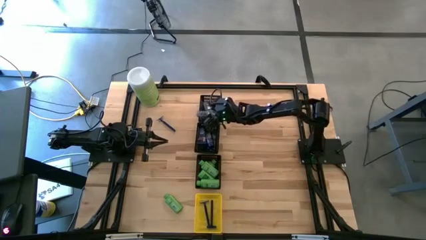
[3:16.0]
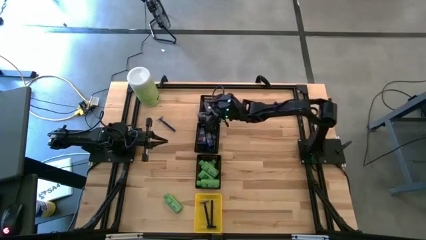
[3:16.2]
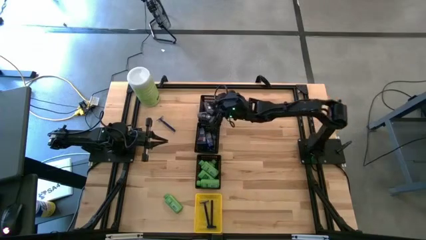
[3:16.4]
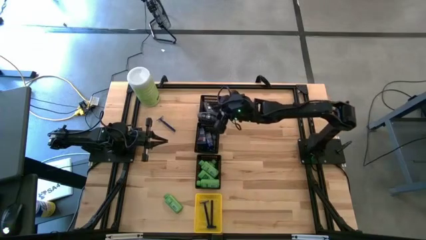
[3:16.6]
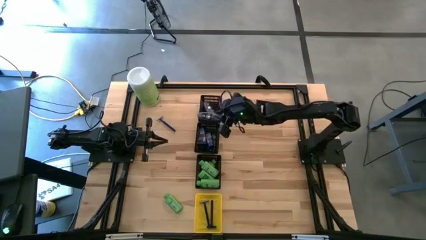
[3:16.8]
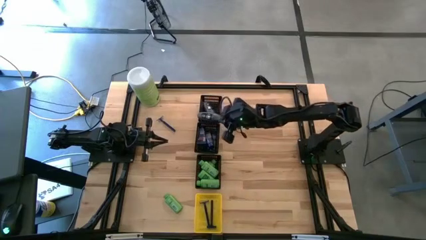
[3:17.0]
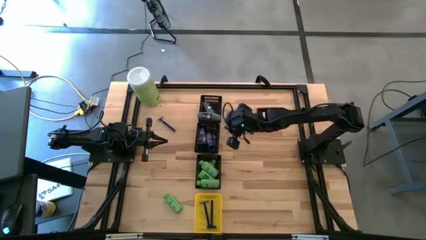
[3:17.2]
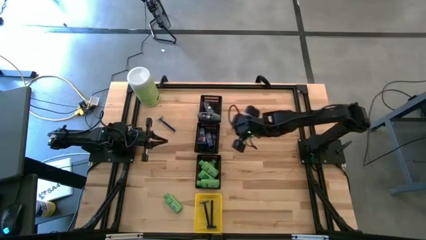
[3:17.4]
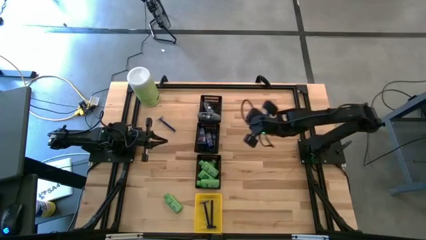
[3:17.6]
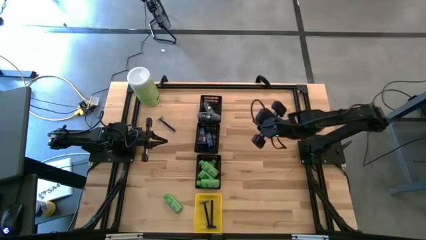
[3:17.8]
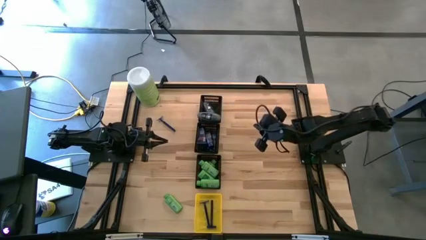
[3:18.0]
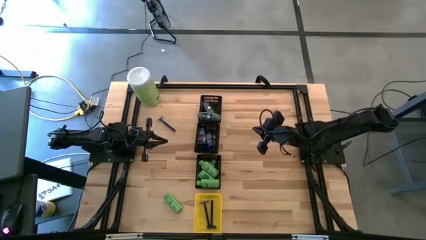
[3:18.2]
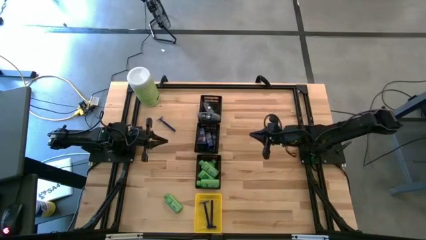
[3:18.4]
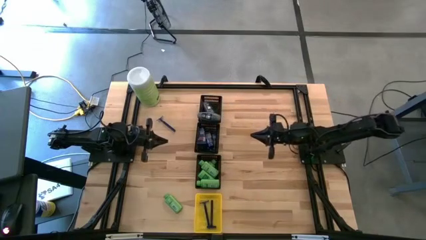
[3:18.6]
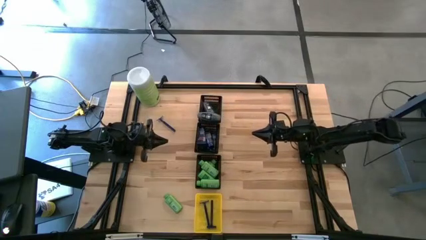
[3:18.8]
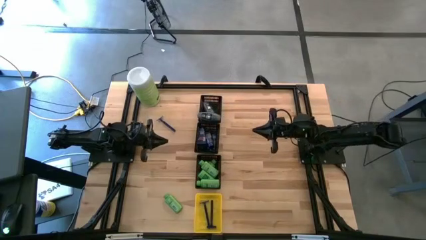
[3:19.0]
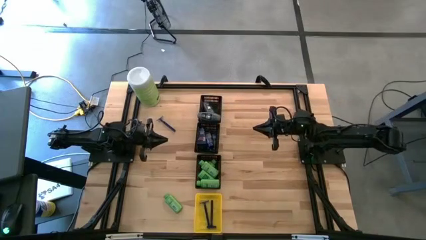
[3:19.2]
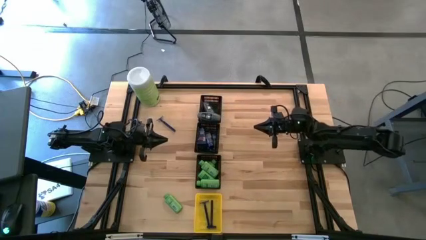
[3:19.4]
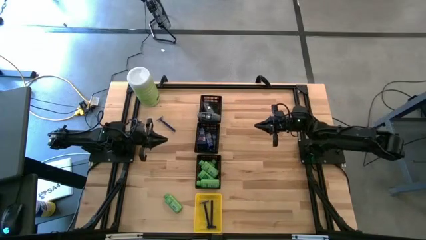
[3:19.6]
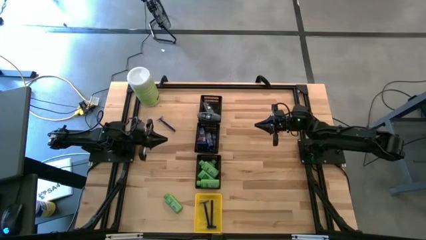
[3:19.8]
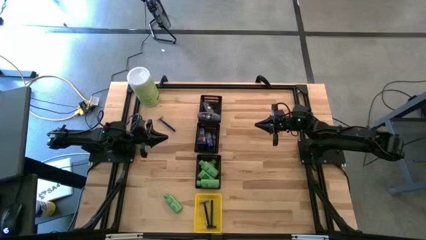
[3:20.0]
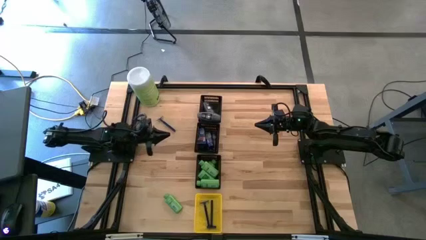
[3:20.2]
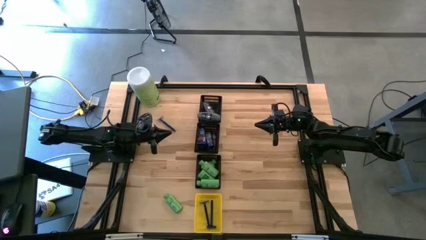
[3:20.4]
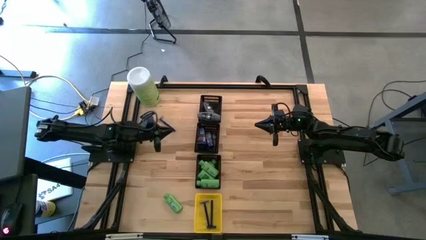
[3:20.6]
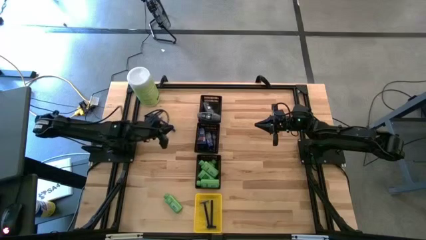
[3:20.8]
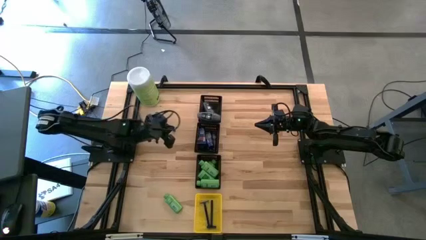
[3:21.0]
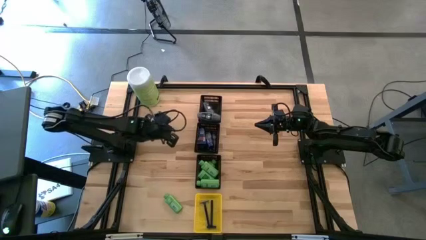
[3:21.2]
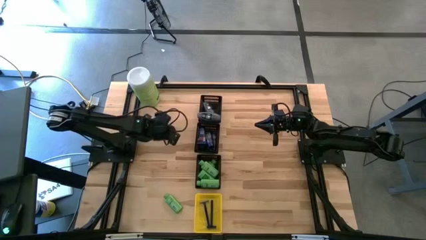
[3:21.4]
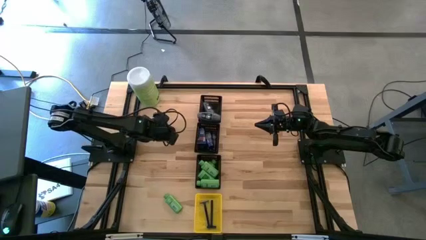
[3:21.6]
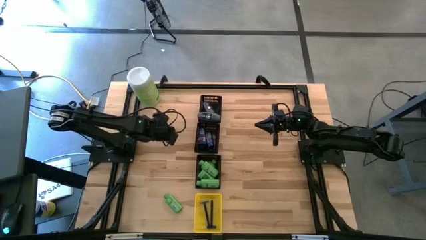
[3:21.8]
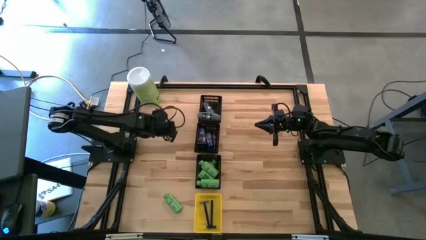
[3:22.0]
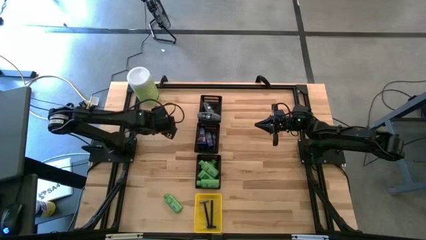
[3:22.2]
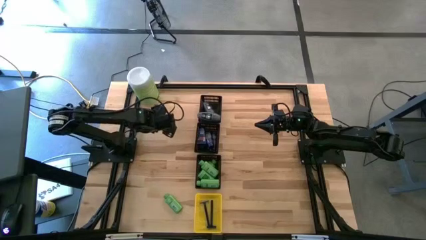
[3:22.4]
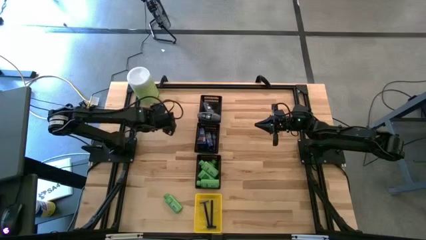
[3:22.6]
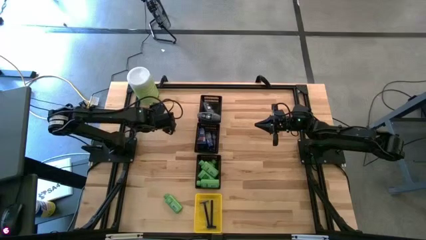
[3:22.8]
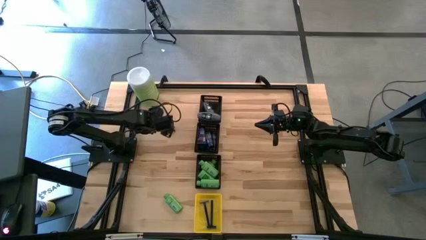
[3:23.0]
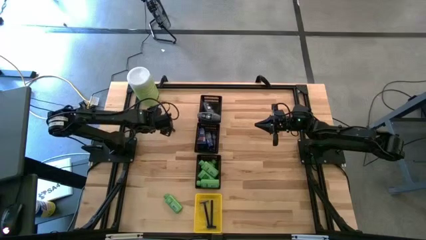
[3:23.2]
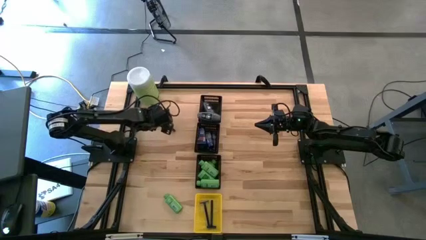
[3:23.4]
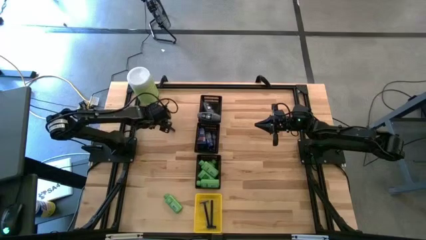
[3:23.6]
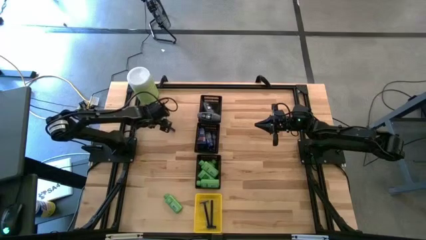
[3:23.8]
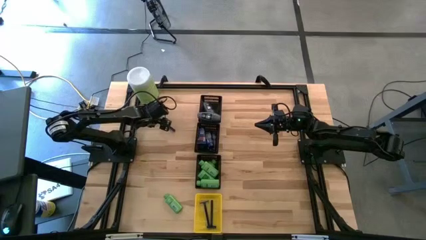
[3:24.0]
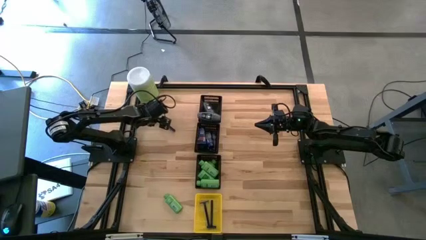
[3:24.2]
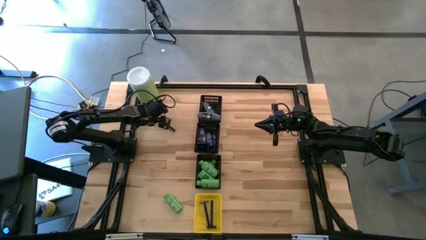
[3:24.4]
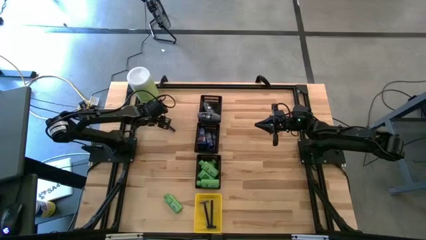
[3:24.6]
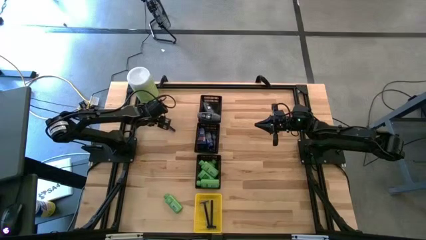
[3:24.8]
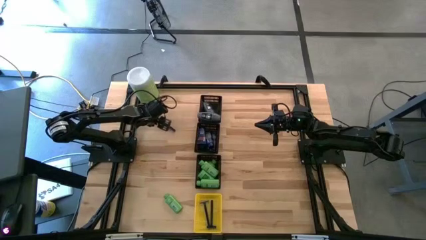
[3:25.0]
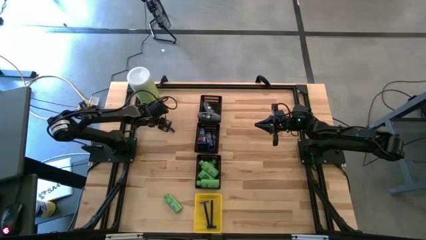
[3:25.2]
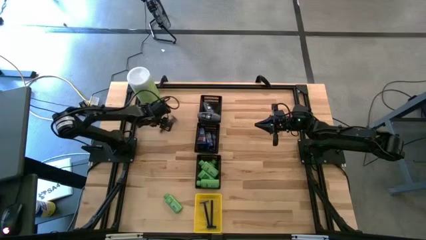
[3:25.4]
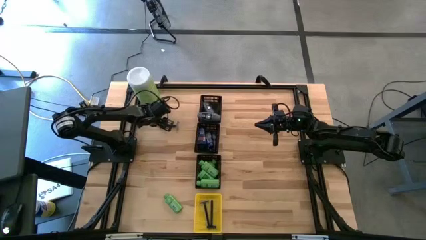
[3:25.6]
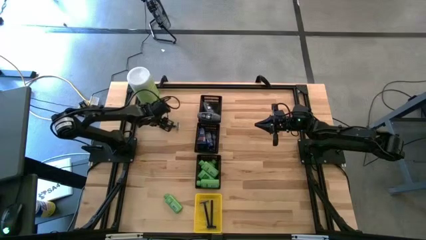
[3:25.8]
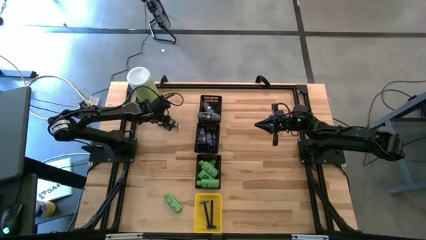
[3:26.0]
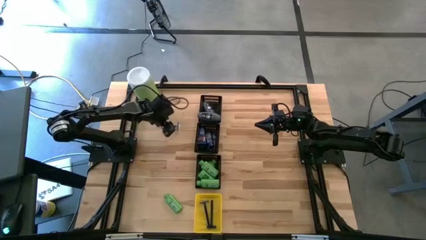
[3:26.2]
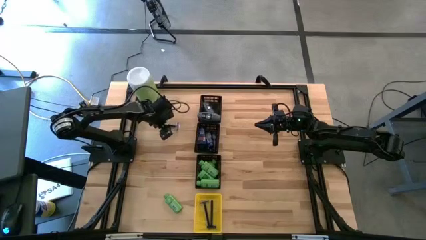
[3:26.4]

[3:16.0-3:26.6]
Task: Pick & Place Travel size toiletries
Put the blue razor into the yellow bin

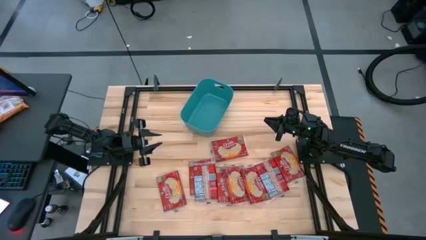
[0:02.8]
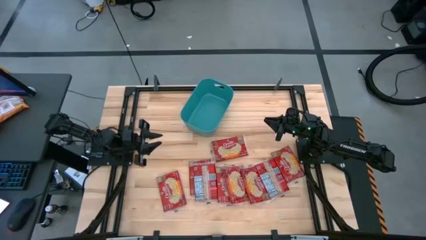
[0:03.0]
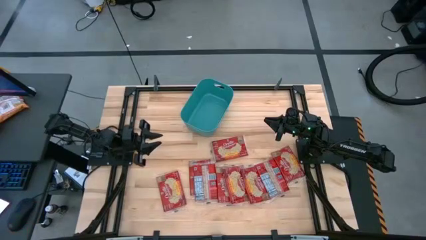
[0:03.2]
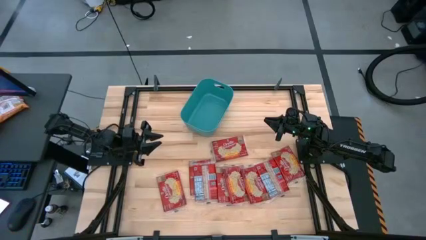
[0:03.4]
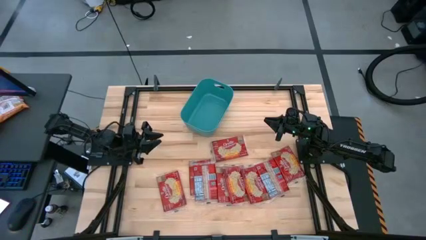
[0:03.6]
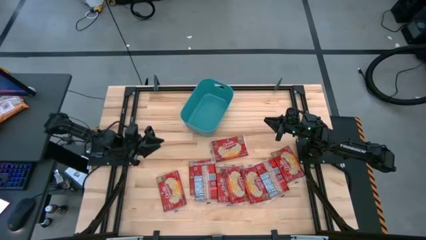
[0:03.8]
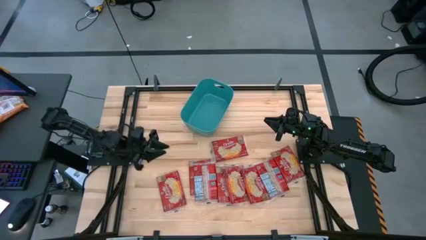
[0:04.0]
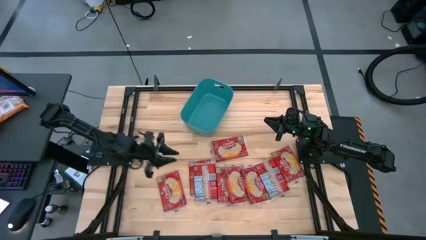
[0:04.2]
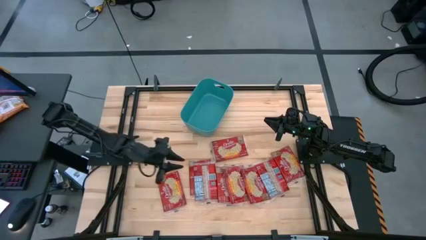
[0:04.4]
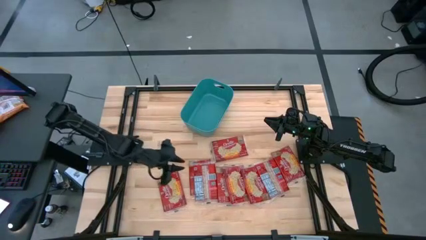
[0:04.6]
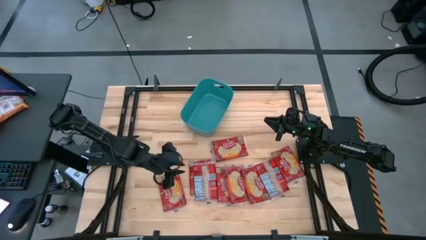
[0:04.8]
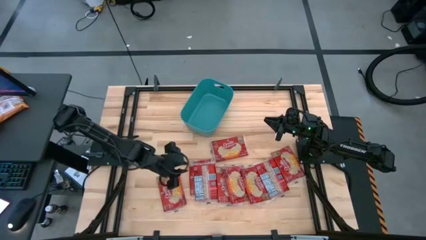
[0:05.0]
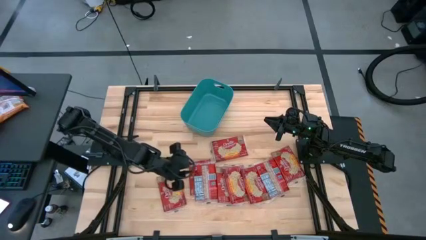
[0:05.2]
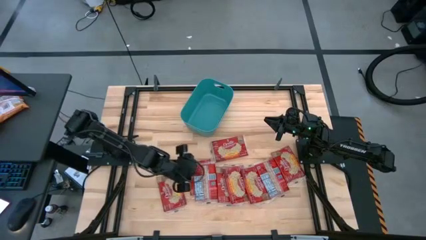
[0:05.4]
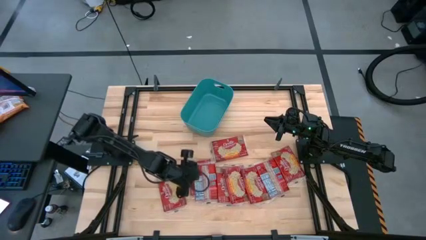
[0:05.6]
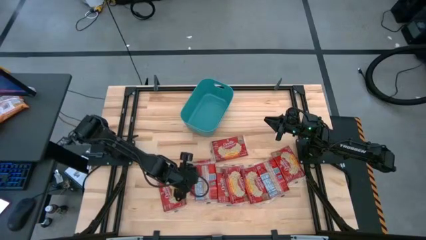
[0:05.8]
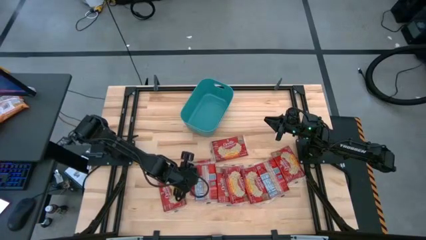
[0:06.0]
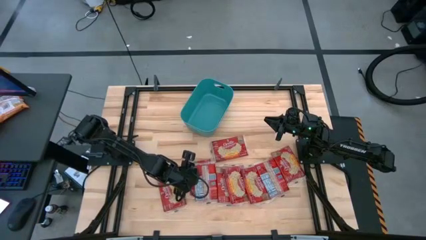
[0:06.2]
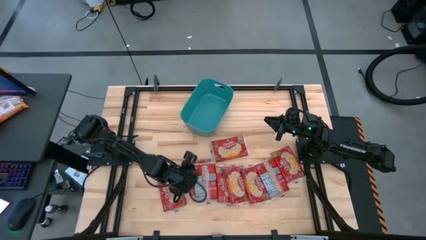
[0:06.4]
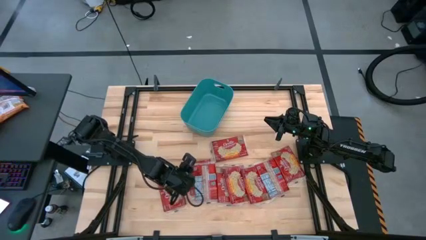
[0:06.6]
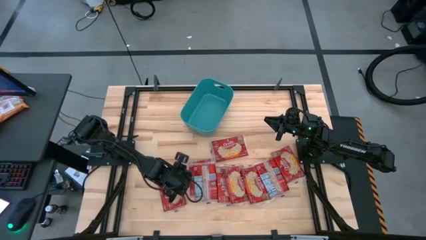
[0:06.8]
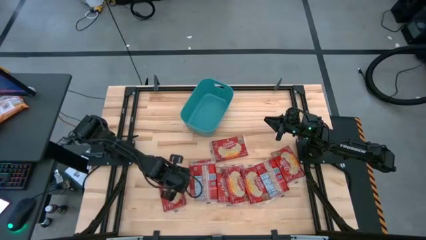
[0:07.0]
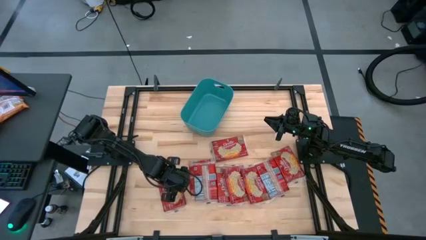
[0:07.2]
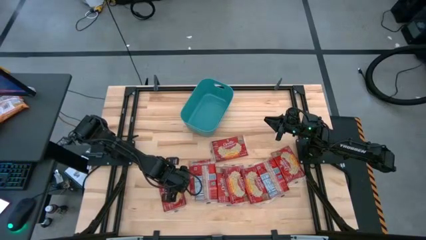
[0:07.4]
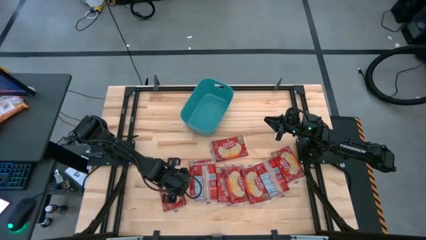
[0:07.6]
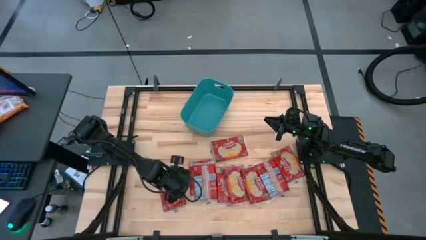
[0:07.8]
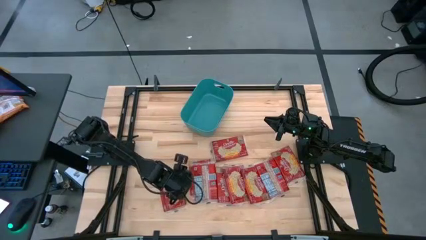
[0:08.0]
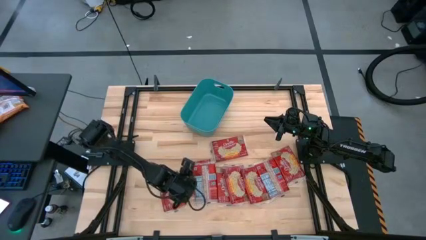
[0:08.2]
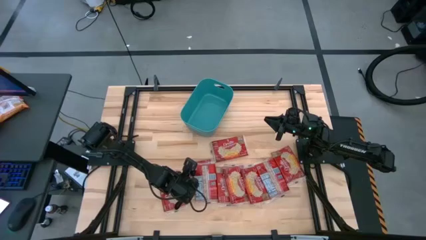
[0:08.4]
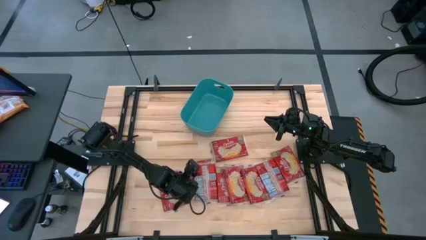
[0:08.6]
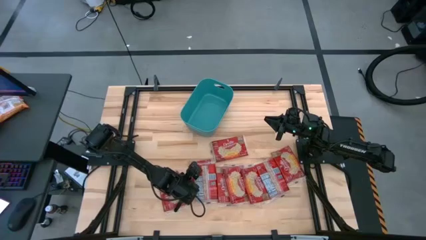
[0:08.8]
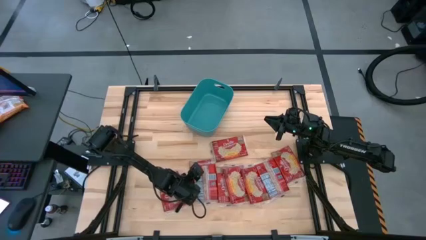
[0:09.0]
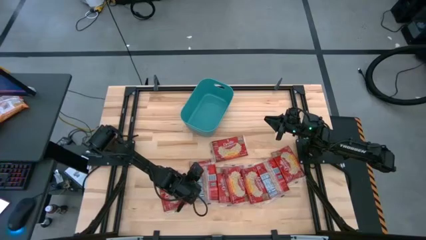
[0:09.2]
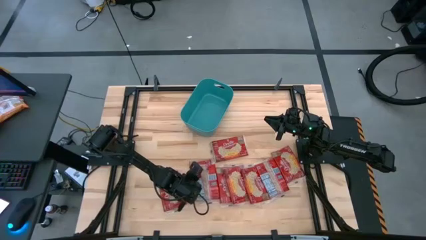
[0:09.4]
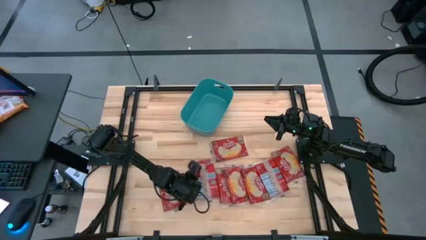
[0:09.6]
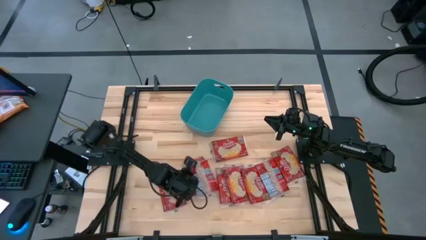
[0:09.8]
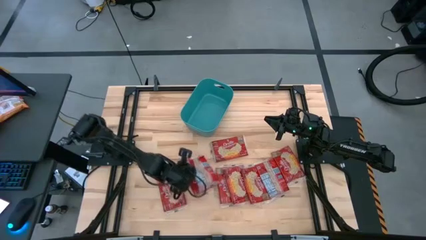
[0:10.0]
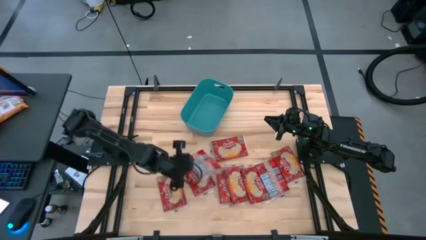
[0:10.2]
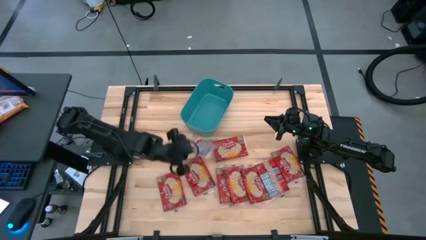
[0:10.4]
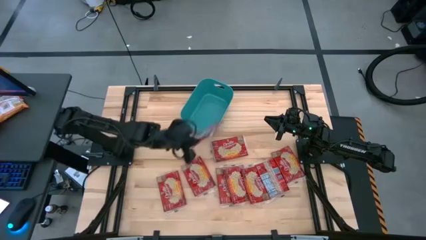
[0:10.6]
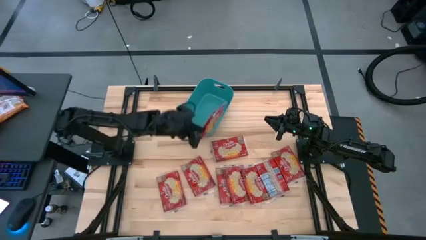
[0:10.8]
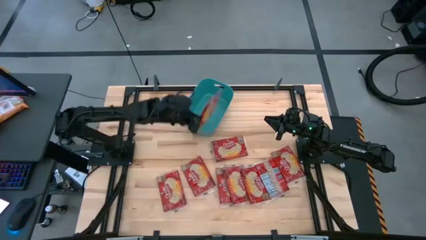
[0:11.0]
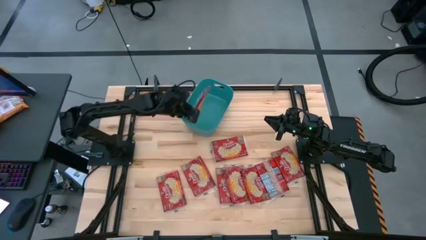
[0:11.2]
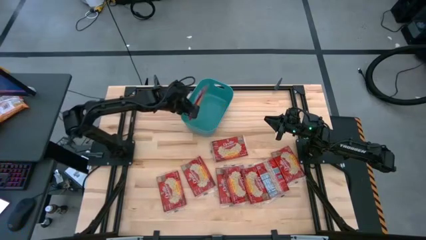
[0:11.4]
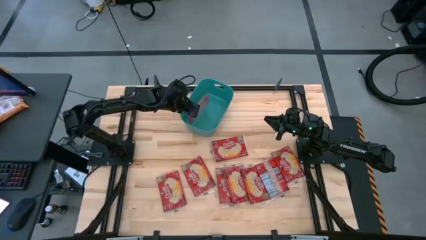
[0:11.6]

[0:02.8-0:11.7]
Task: Sort popcorn bags into baskets
Put the popcorn bag into the green bin
